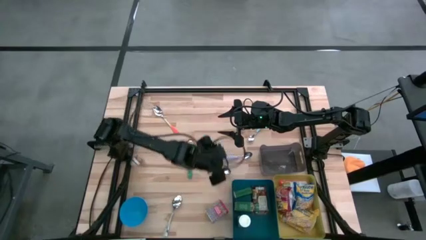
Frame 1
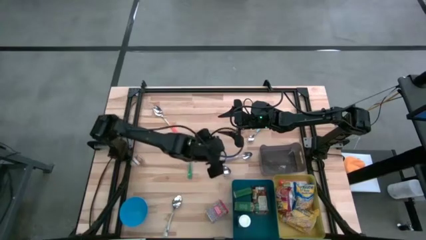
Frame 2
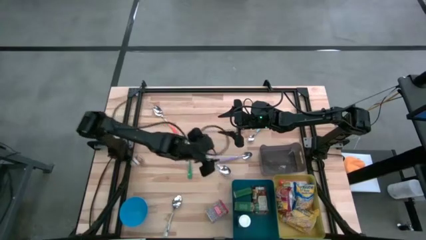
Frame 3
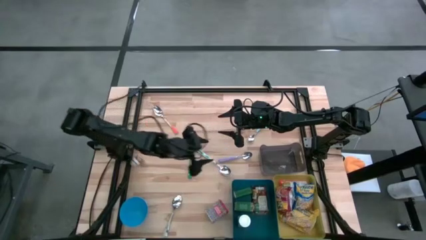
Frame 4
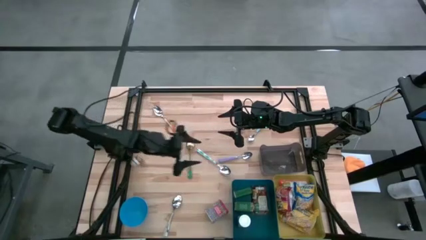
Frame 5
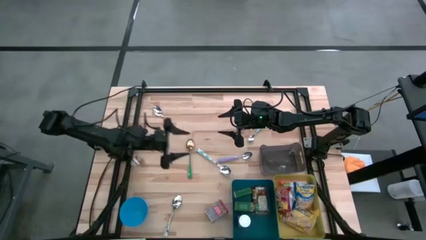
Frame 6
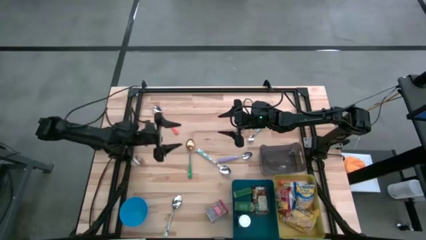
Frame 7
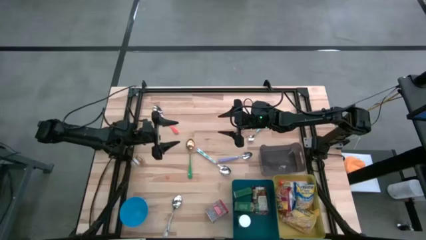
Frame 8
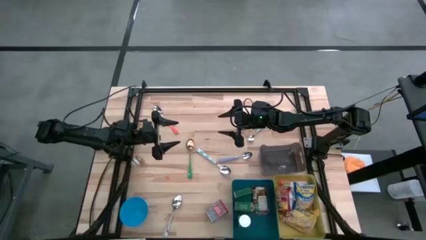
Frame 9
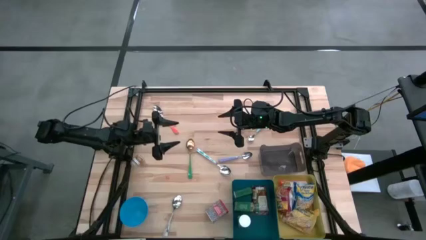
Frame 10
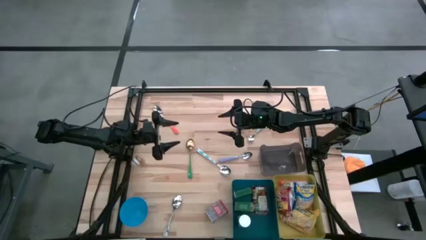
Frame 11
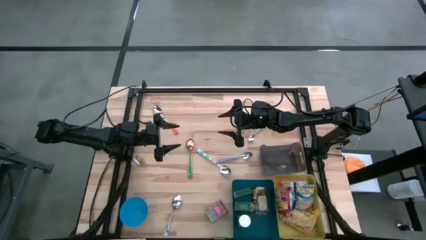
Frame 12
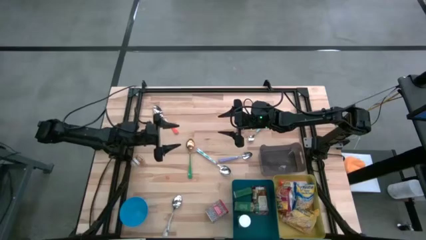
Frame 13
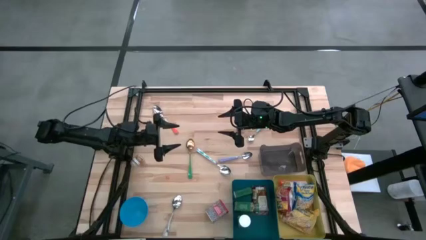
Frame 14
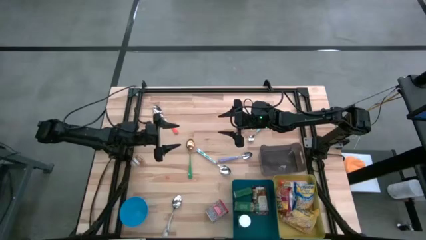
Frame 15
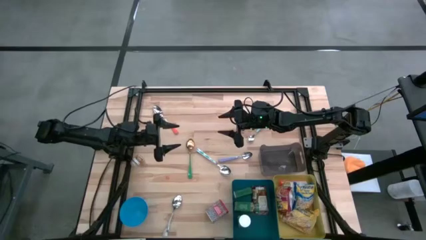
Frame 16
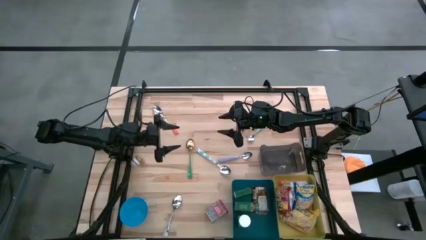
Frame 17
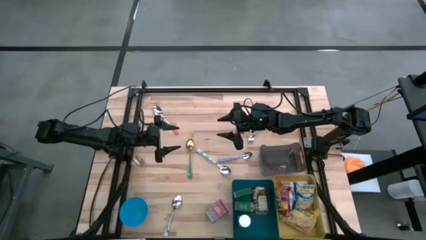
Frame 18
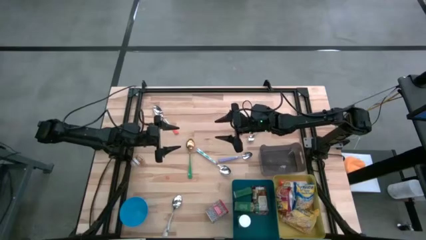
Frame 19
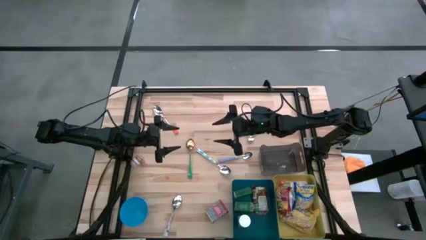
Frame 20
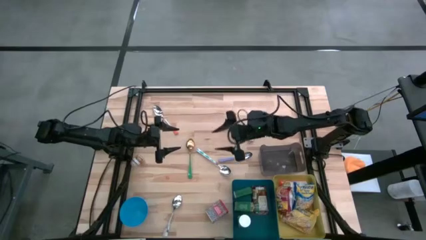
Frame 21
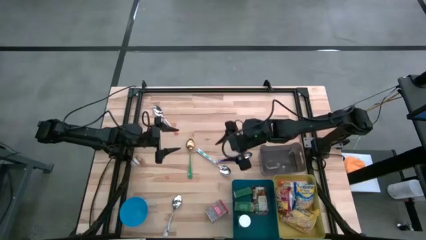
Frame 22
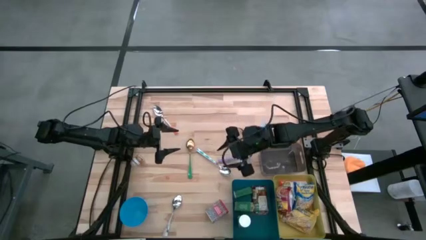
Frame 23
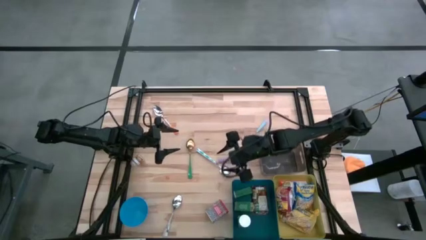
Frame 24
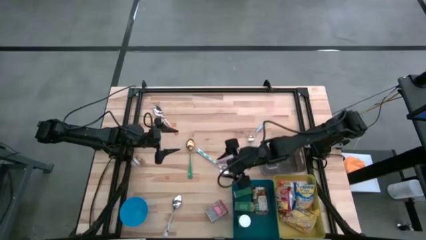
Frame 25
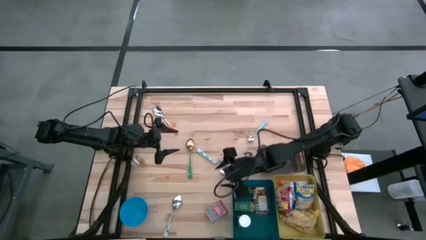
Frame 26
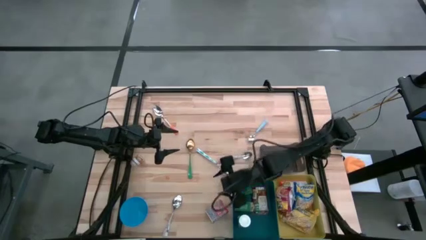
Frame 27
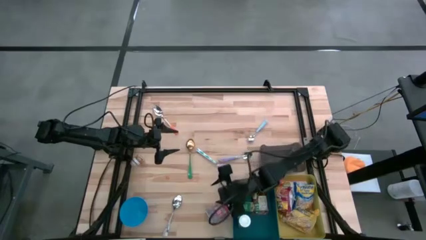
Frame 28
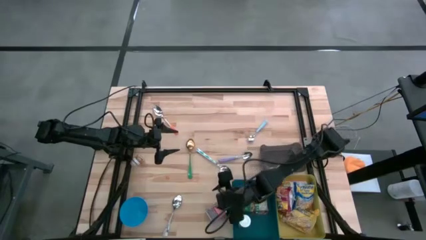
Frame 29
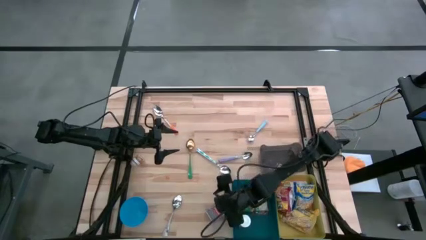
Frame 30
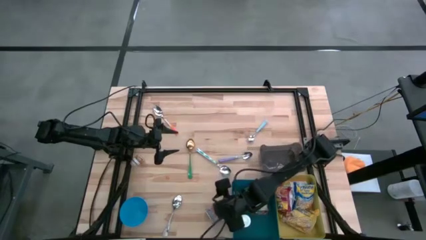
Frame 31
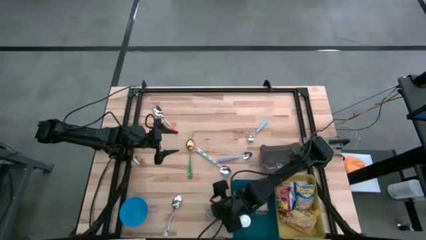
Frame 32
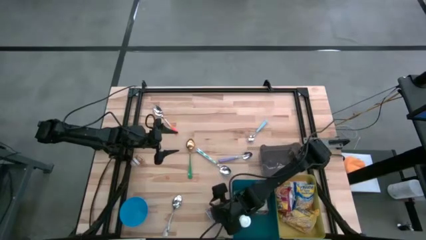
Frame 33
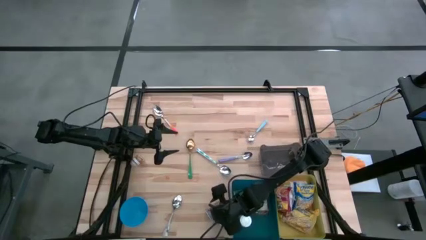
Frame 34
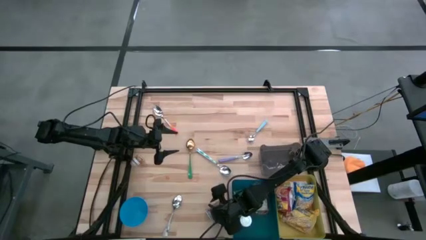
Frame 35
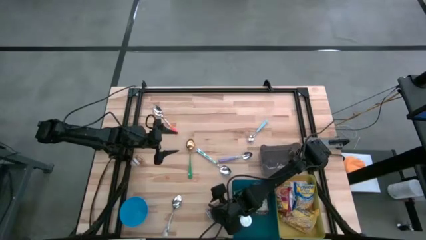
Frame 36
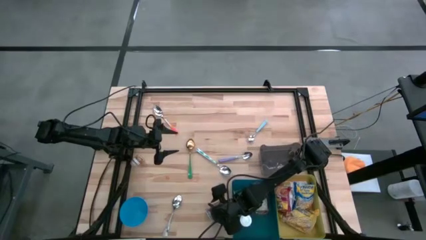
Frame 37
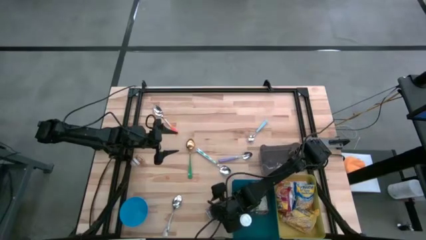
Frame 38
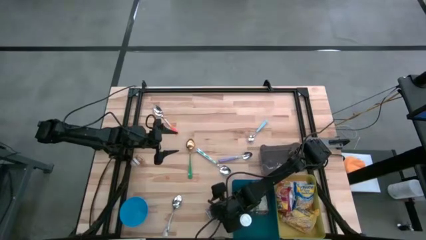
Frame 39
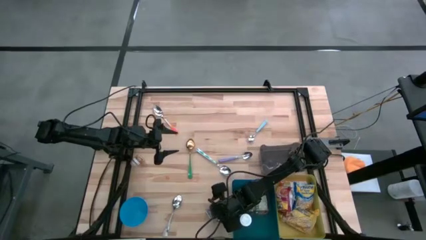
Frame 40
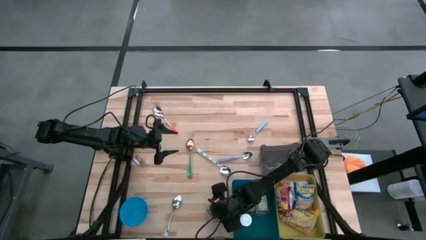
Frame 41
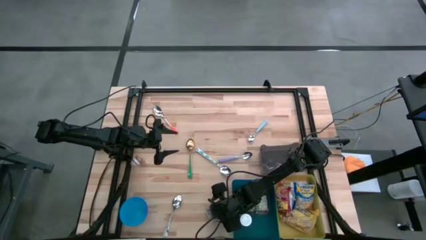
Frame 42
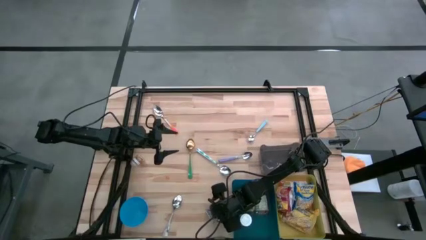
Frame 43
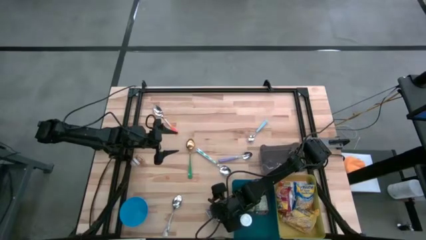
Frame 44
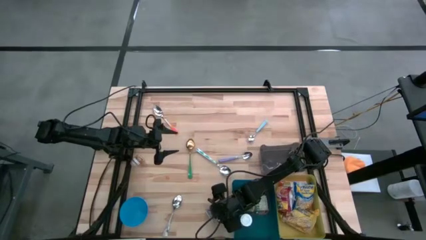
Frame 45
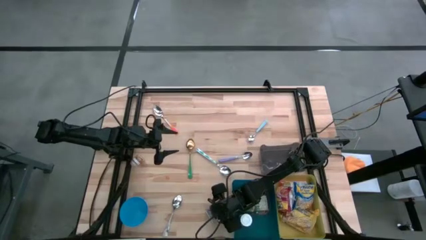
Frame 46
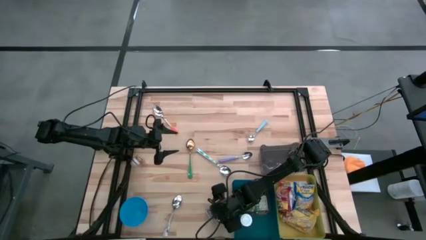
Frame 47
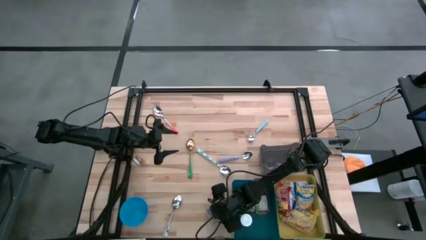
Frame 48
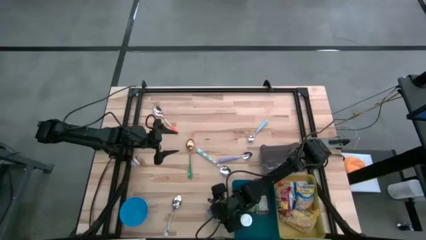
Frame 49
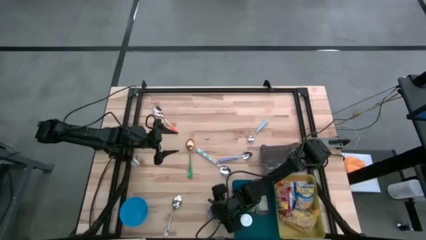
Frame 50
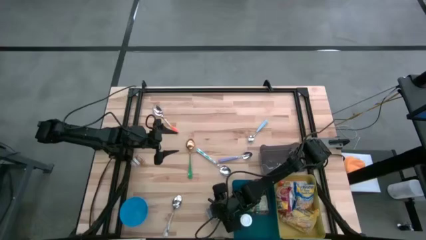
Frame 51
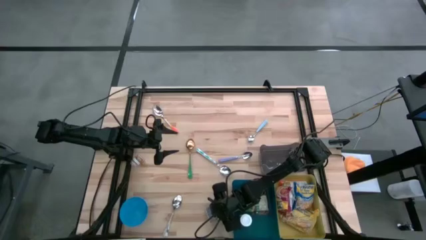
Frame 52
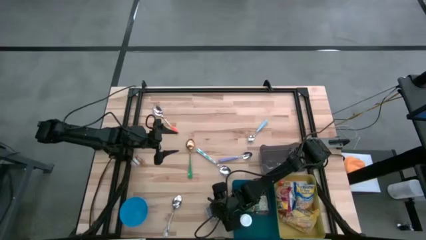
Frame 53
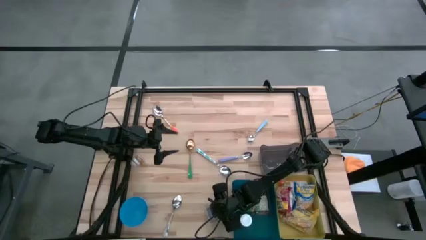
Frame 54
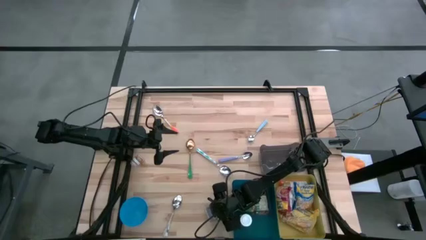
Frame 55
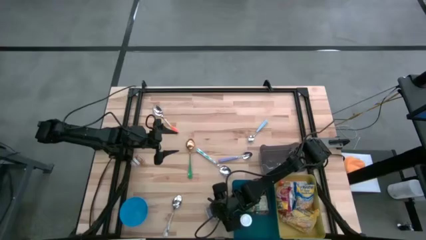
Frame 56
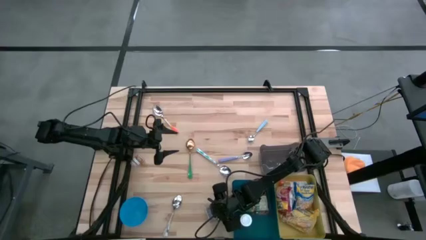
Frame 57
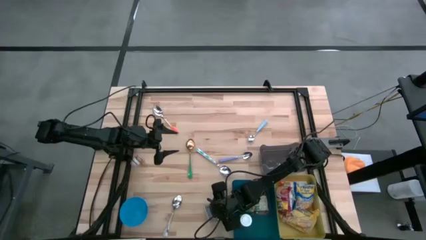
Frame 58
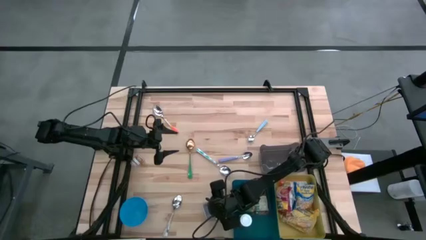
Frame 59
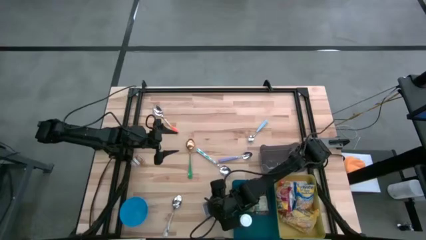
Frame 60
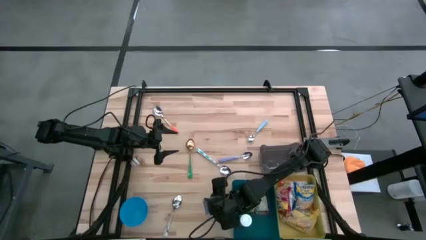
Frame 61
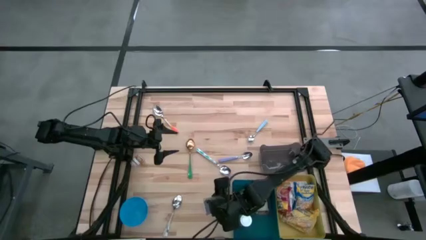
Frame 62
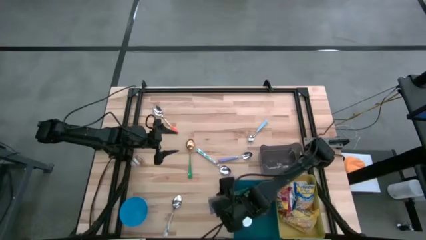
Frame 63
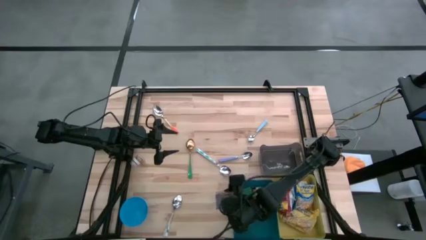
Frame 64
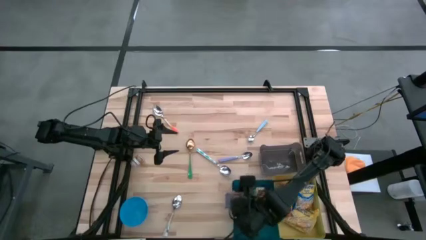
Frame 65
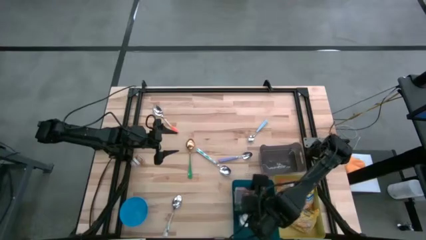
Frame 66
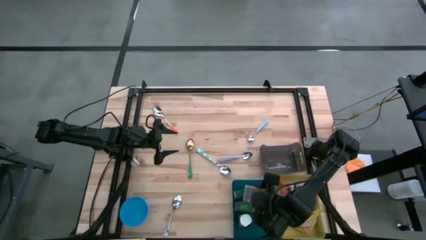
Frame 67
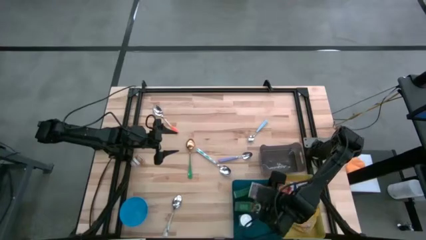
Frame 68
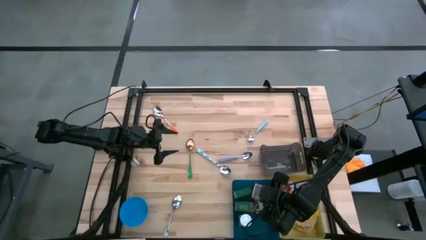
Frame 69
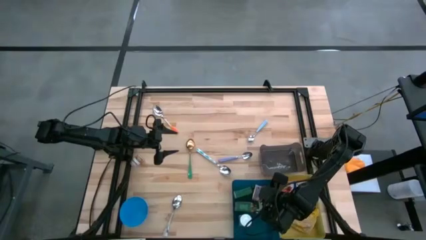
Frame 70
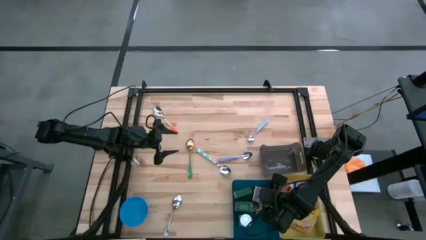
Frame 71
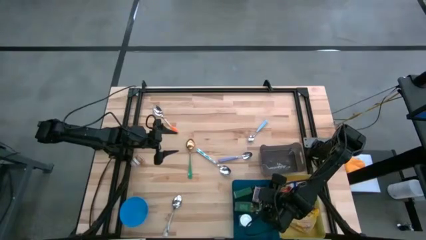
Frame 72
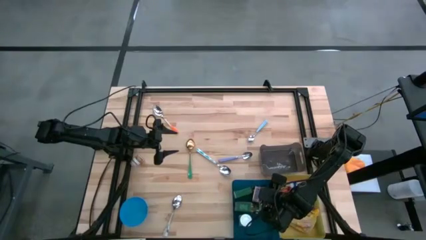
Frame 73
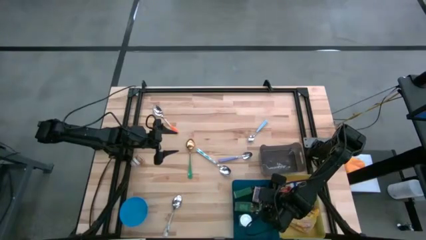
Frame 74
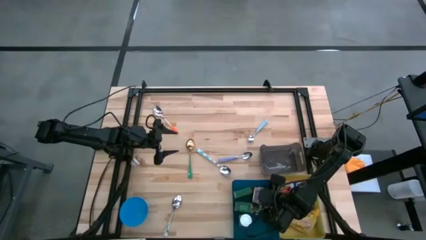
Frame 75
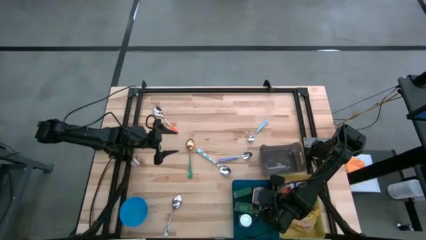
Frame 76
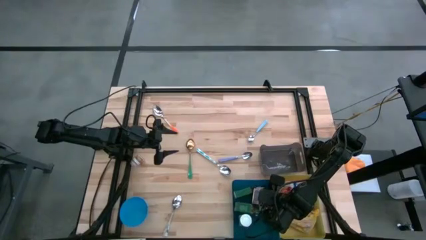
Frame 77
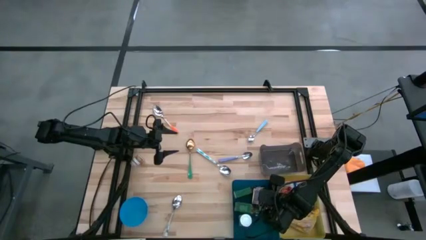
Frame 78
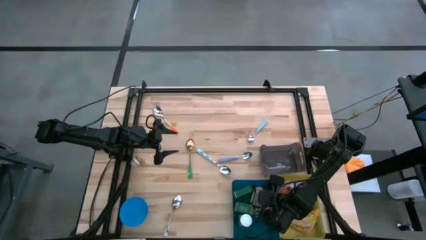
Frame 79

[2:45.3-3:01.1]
Put the red seasoning can into the blue bin
